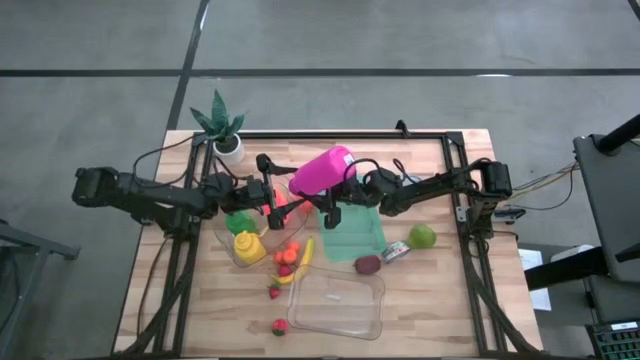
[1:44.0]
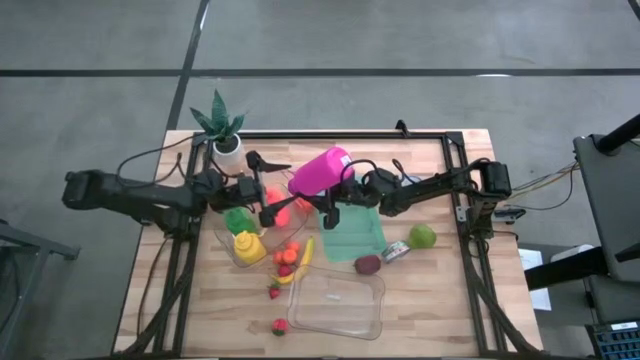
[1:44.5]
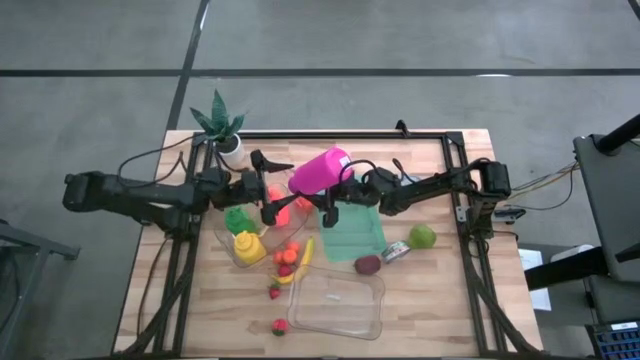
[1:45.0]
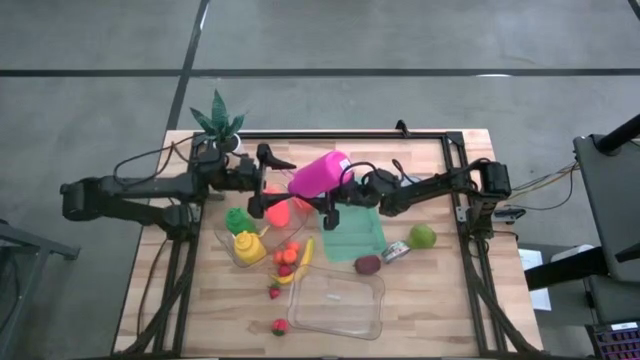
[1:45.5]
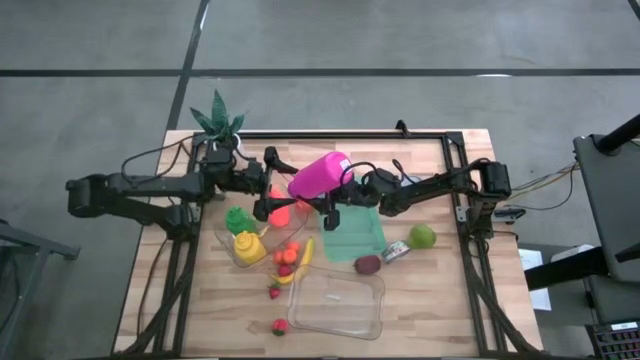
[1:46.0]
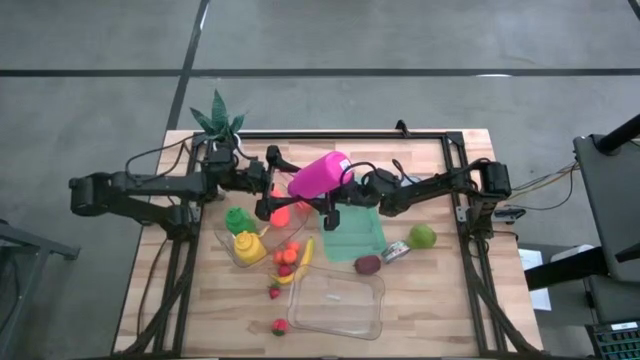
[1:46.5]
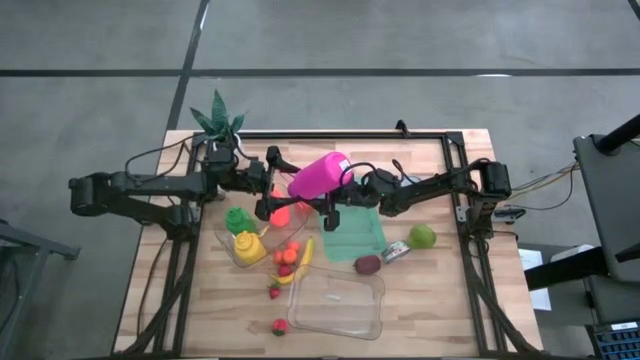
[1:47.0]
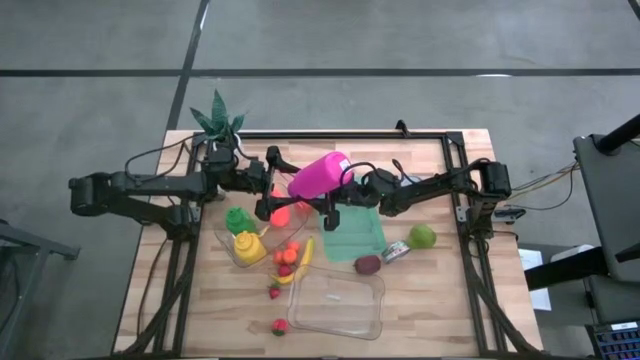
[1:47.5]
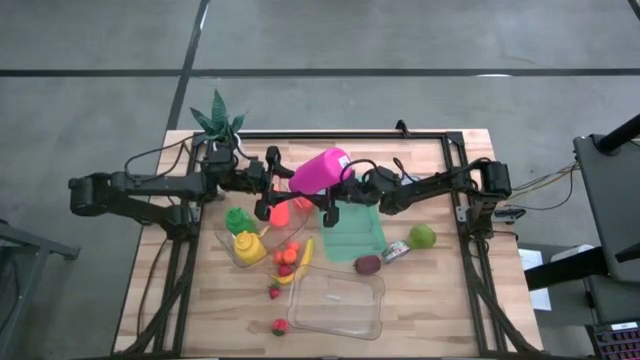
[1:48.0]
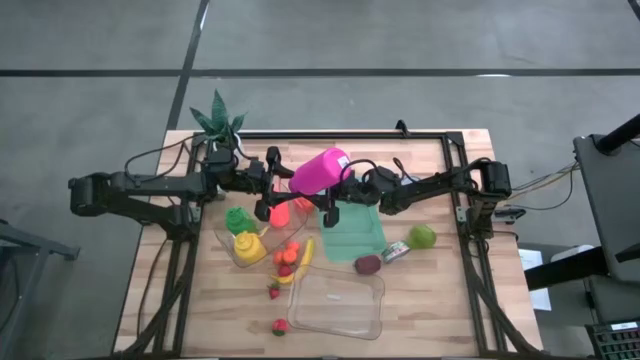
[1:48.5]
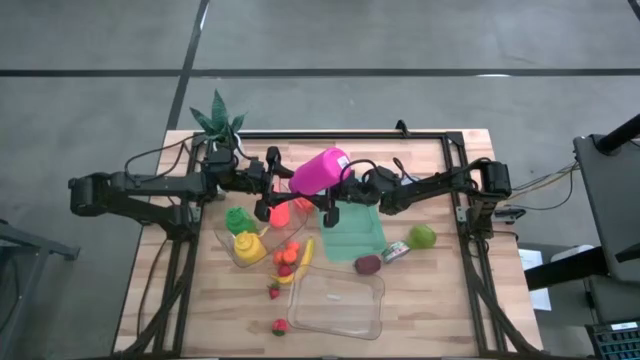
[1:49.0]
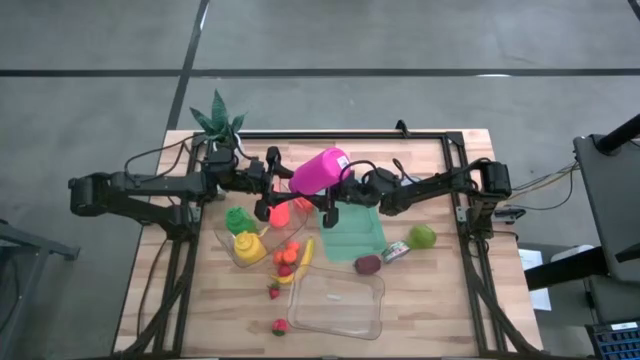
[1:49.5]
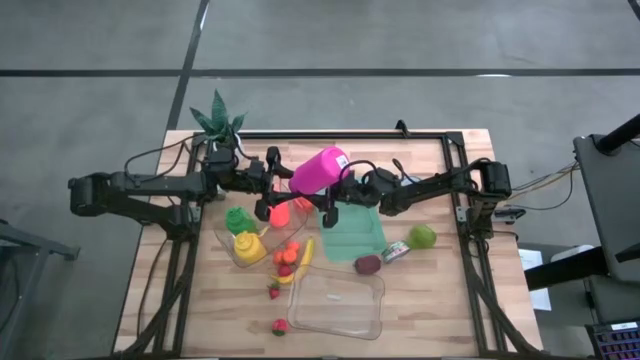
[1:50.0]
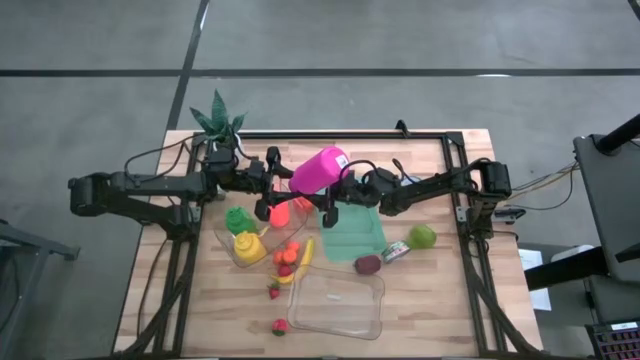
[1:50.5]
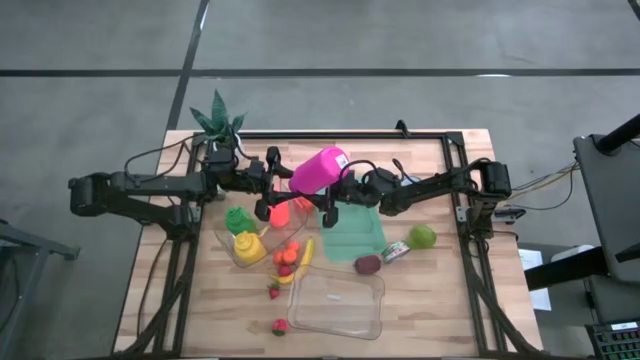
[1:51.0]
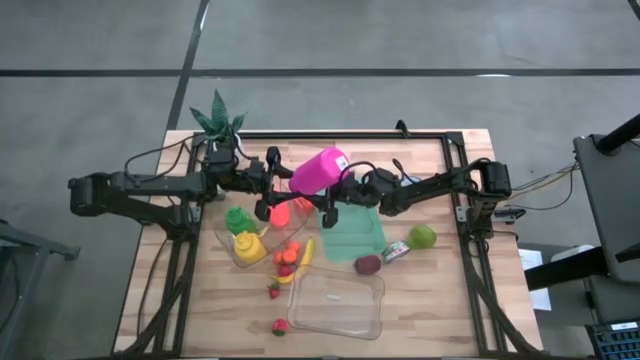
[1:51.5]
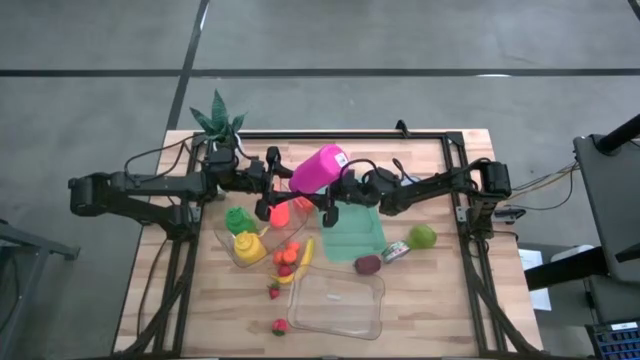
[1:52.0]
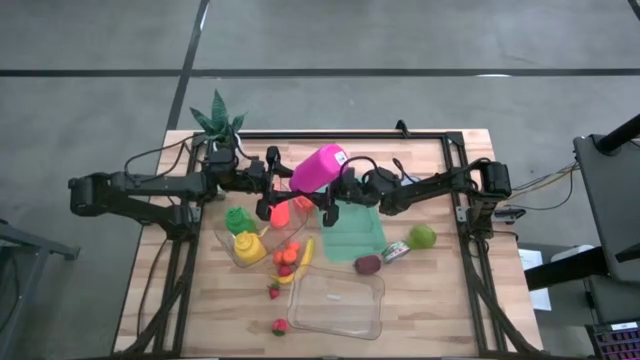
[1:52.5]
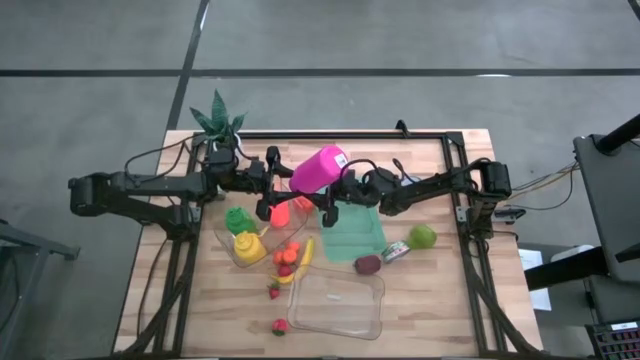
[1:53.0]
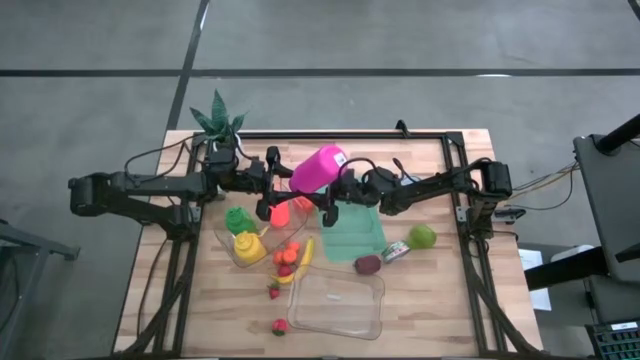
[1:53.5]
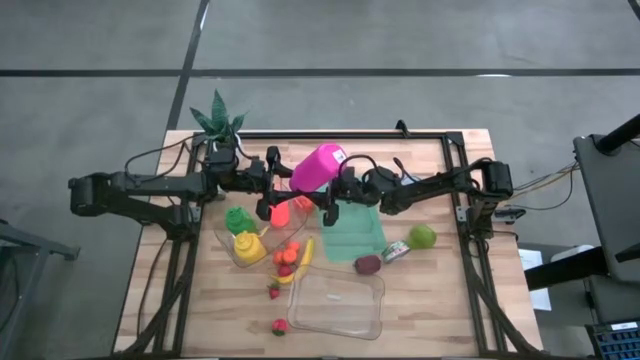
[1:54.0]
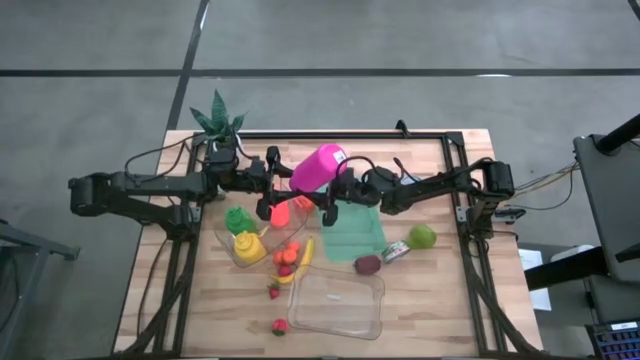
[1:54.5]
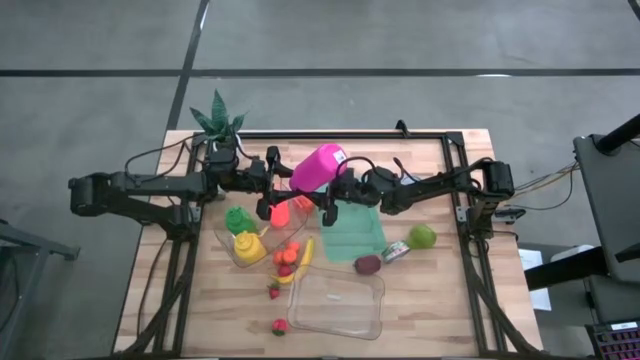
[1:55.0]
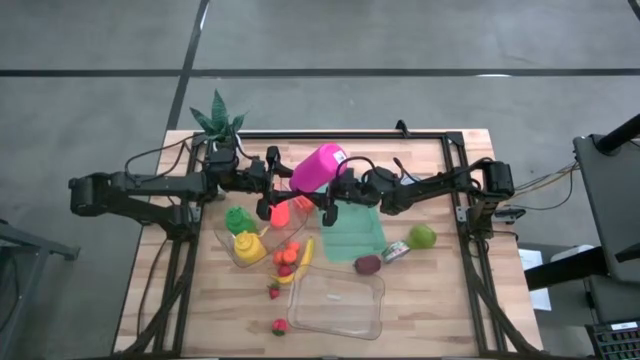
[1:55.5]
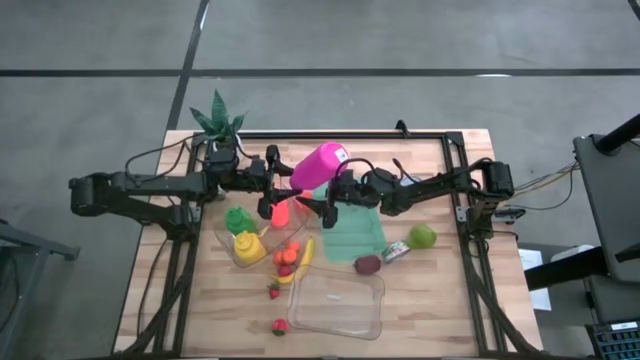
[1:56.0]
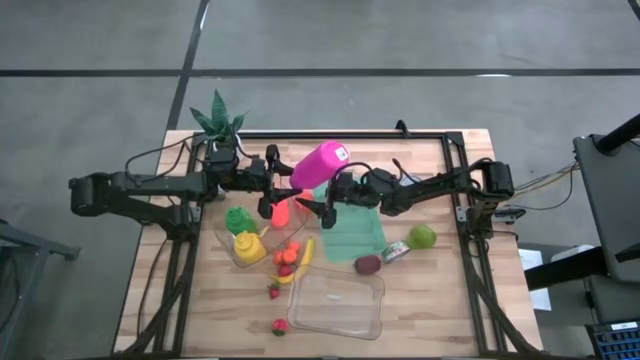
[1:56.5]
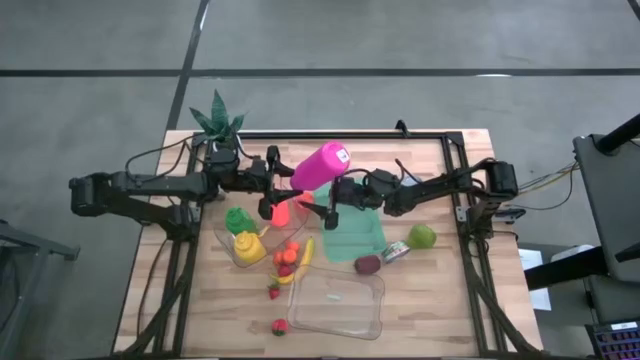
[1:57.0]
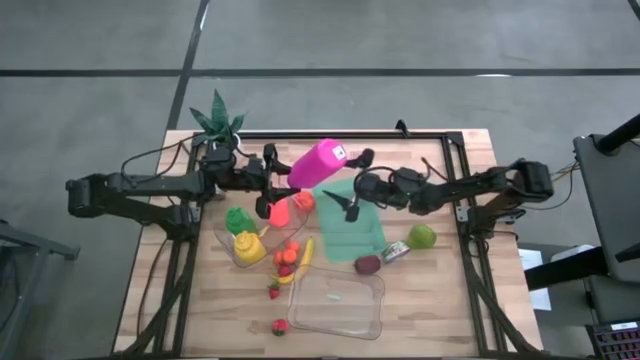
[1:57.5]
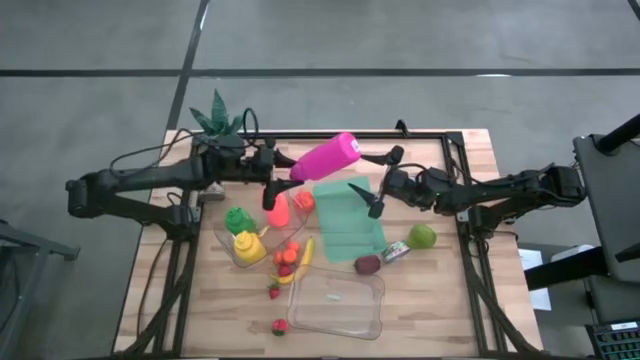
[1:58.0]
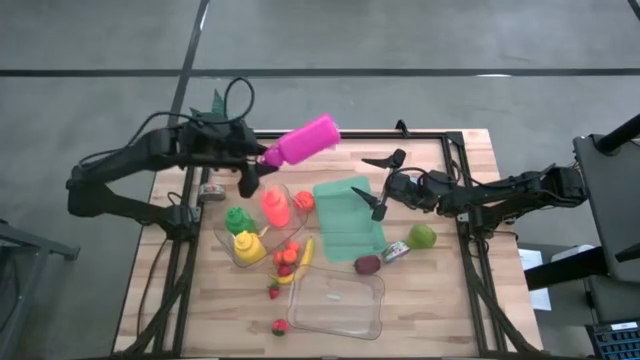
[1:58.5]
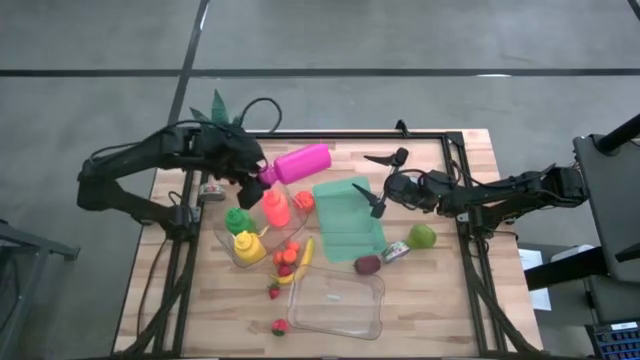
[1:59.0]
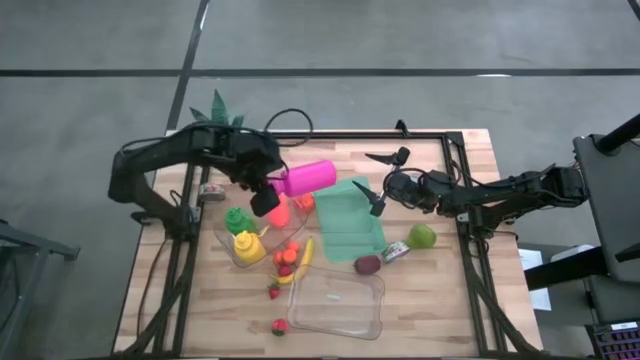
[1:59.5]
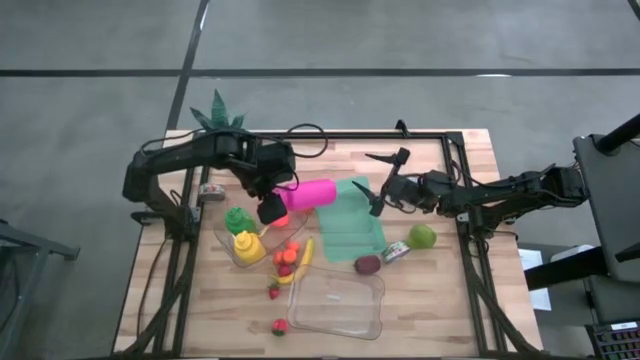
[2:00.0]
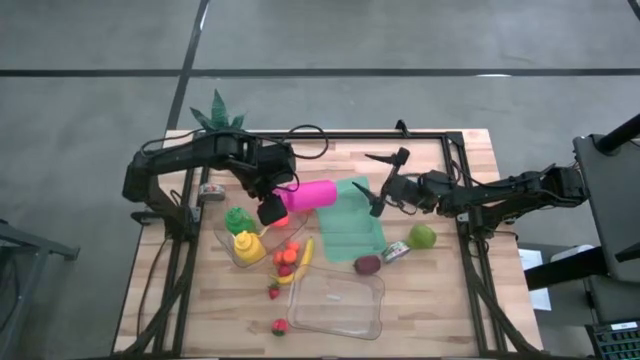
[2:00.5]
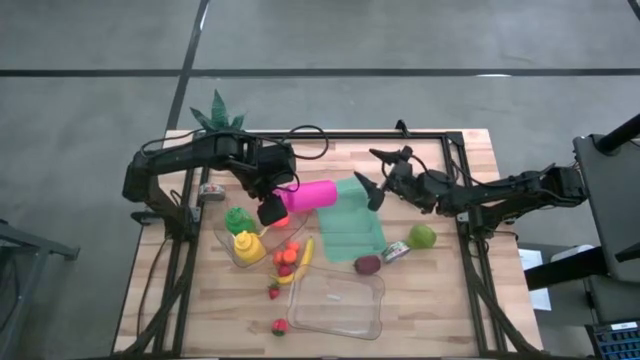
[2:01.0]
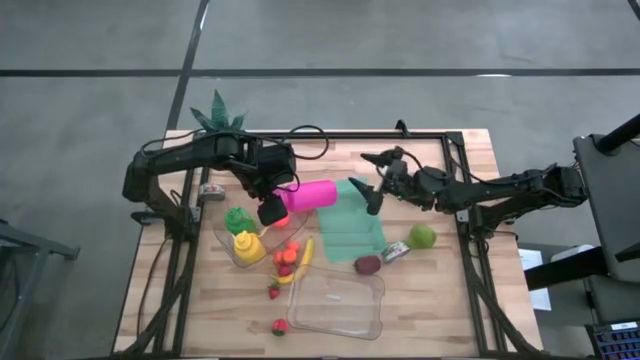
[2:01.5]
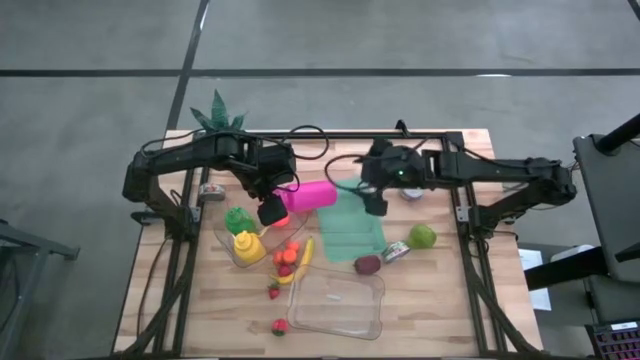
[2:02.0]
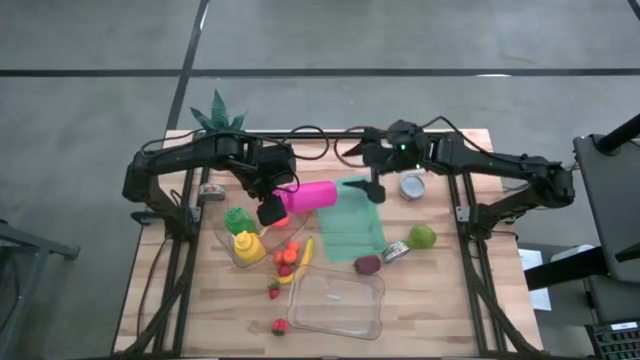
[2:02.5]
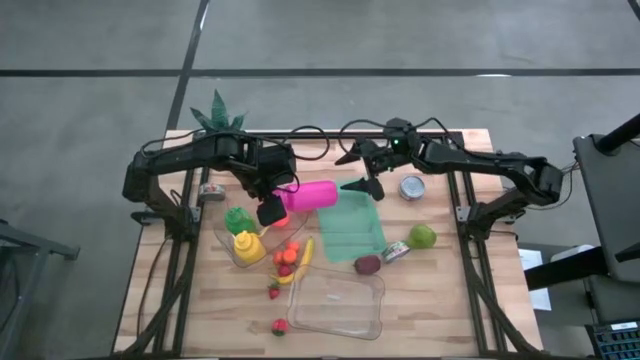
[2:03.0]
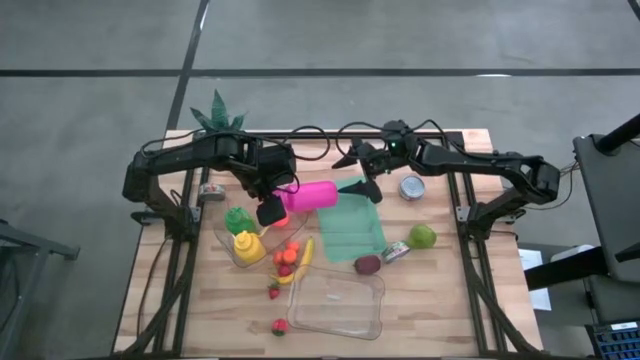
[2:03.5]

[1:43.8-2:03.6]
Task: Pick & Place Food Item
Put the purple water bottle into the top transparent bin

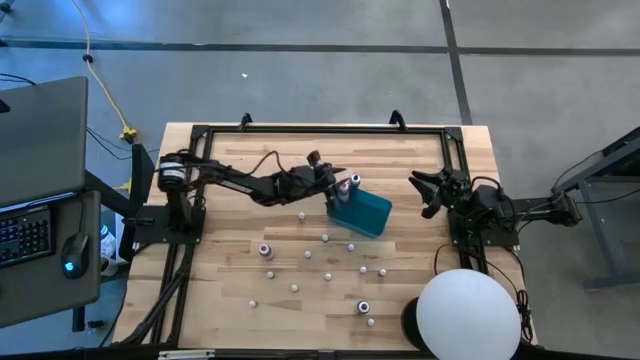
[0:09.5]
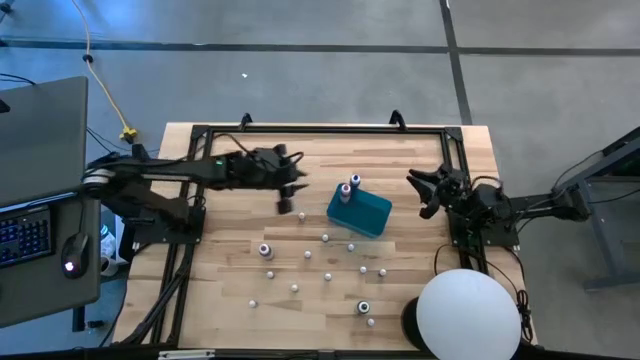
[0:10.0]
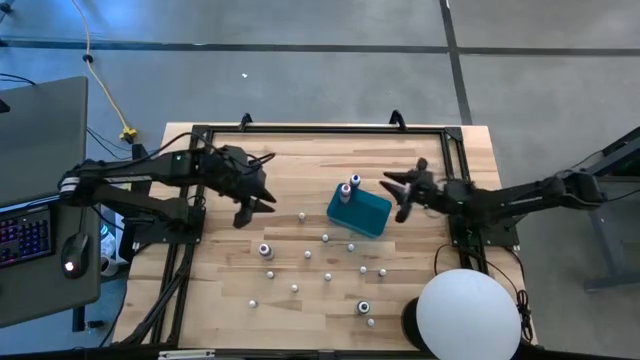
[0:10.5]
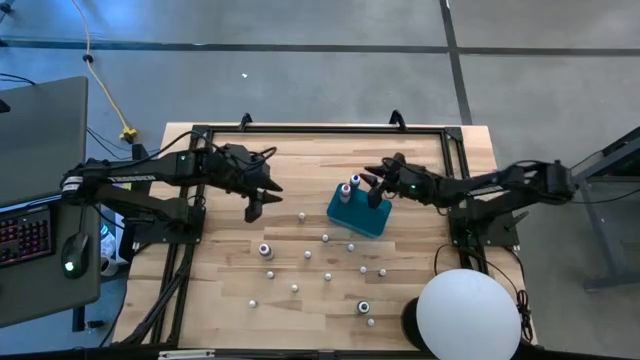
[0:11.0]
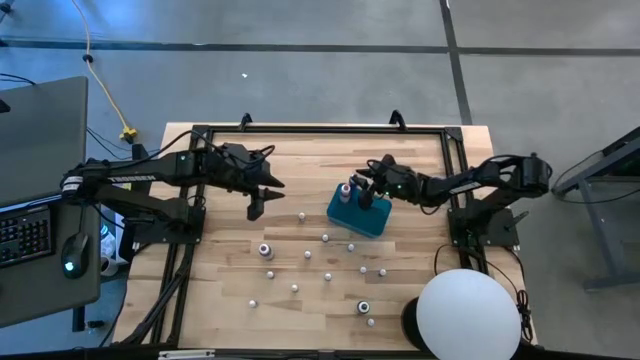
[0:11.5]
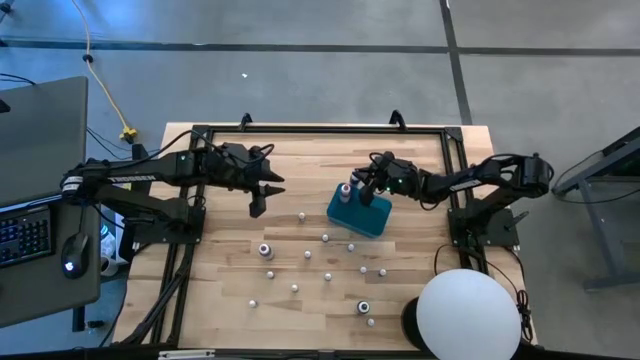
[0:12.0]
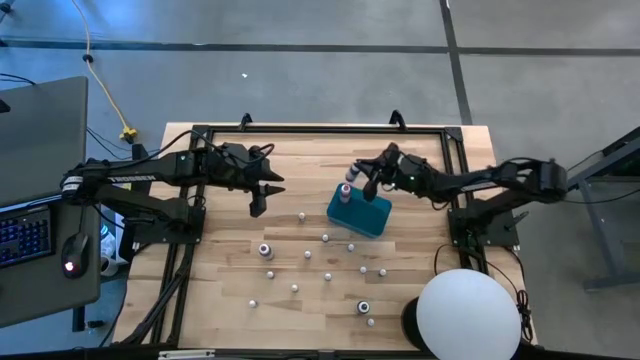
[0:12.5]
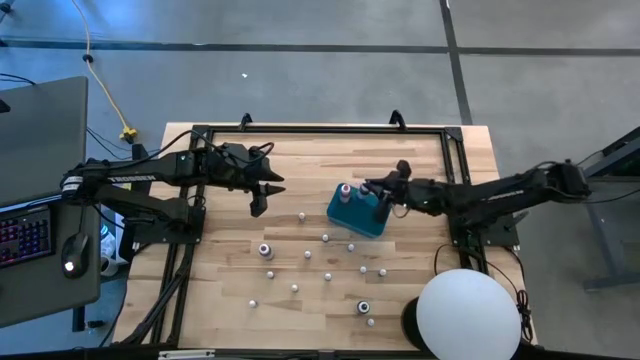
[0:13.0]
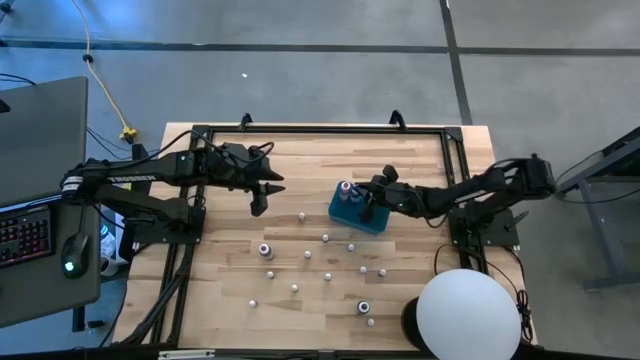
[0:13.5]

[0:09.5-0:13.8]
Task: Pick & Place food coloring
Put the large blue food coloring bottle into the blue container
